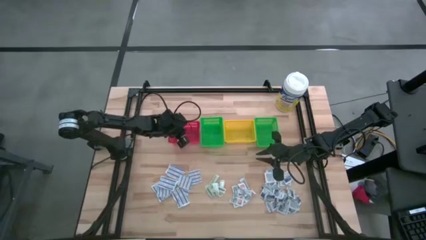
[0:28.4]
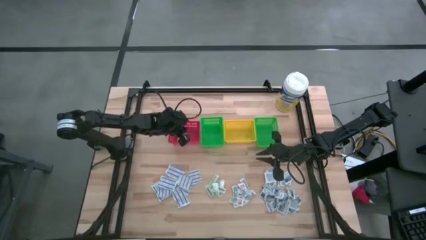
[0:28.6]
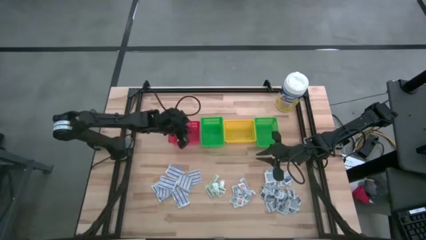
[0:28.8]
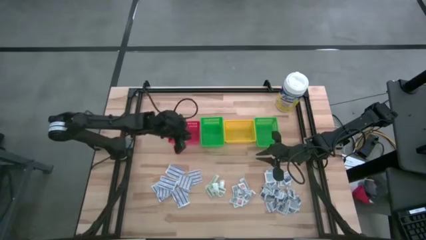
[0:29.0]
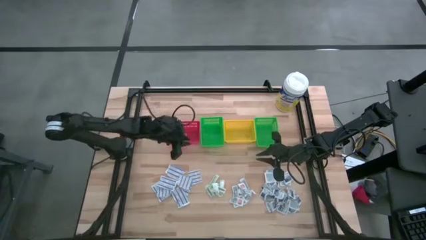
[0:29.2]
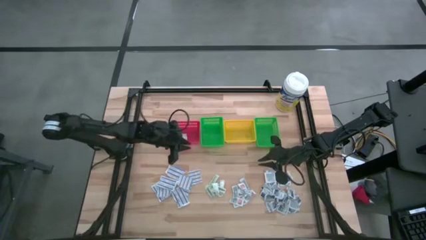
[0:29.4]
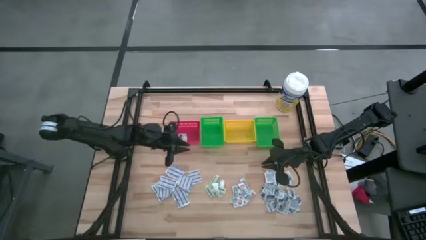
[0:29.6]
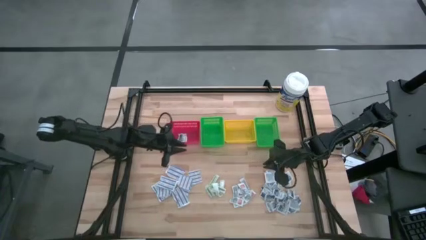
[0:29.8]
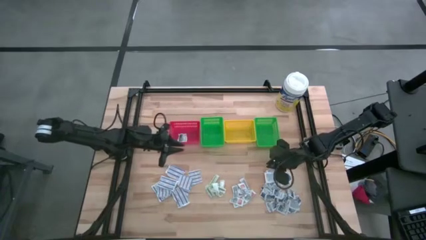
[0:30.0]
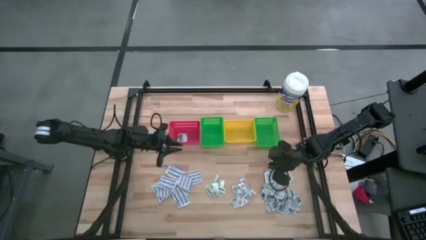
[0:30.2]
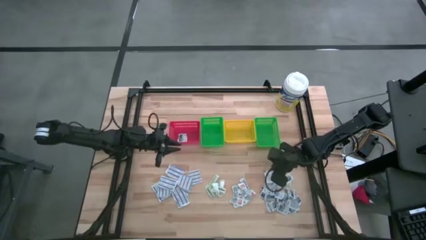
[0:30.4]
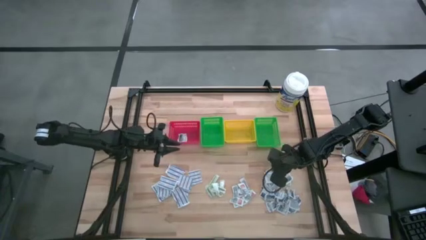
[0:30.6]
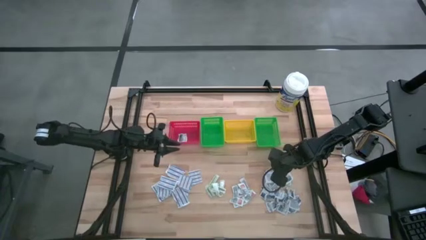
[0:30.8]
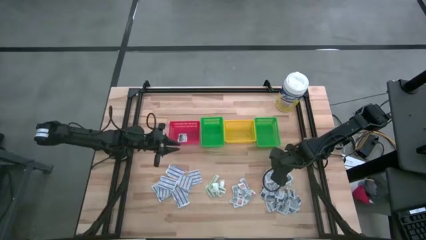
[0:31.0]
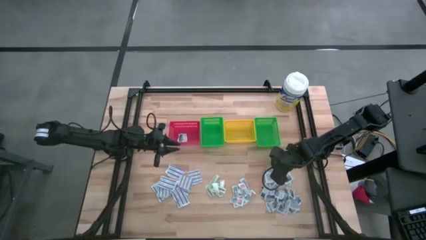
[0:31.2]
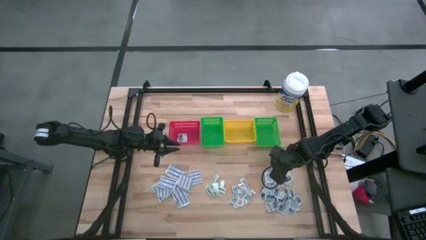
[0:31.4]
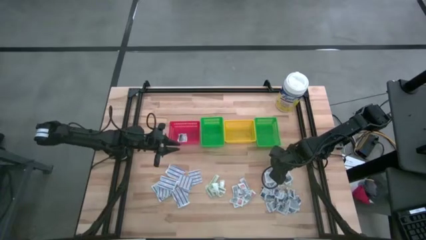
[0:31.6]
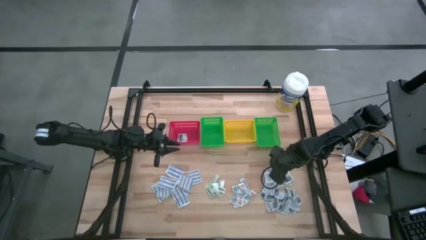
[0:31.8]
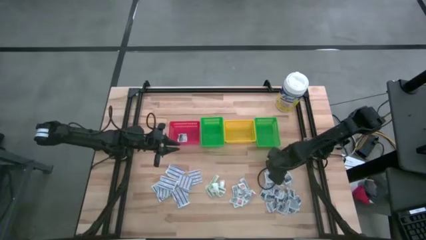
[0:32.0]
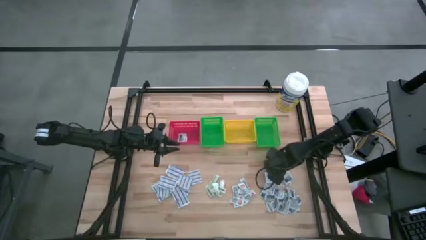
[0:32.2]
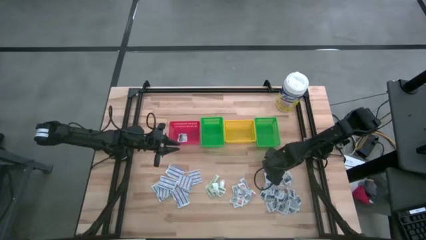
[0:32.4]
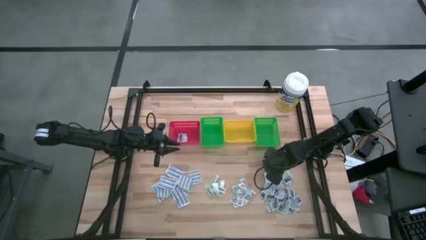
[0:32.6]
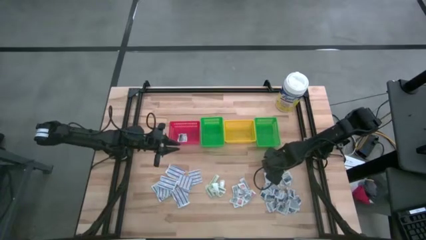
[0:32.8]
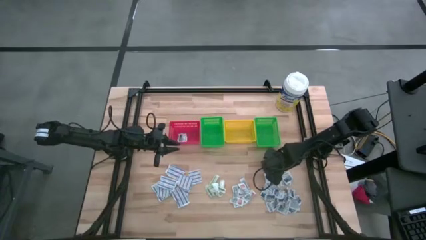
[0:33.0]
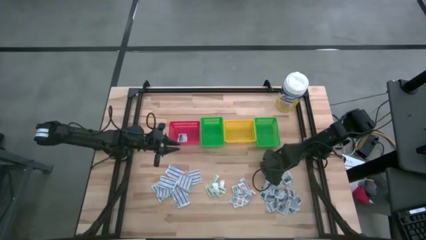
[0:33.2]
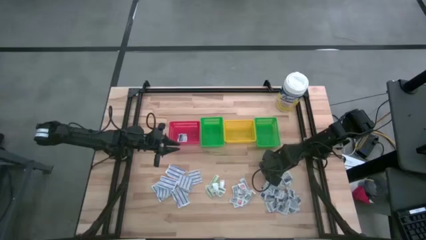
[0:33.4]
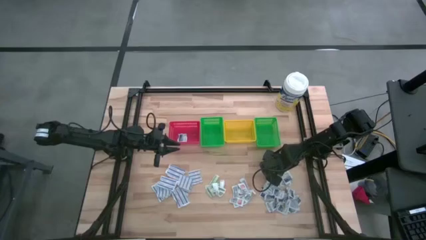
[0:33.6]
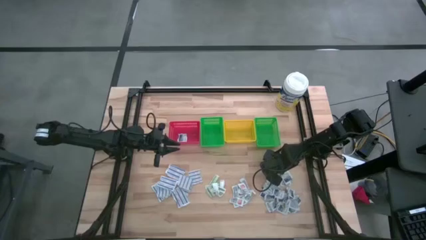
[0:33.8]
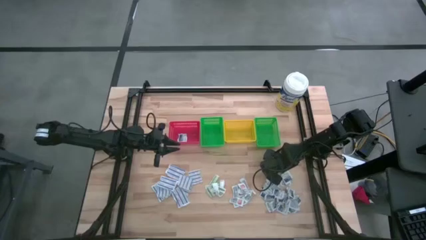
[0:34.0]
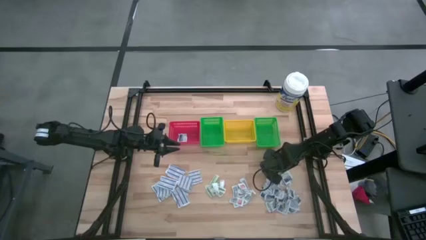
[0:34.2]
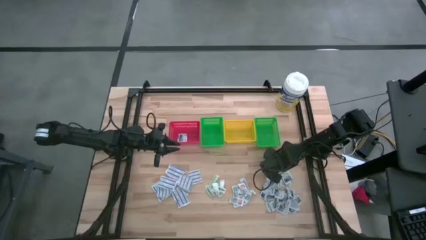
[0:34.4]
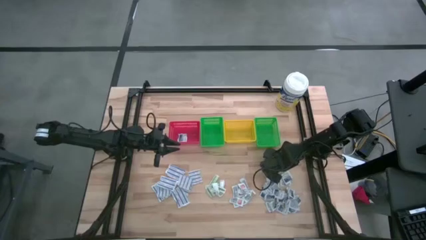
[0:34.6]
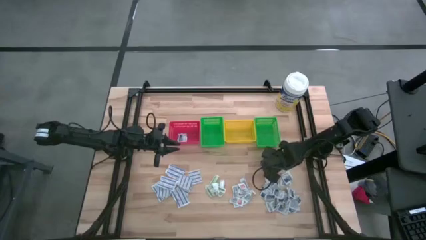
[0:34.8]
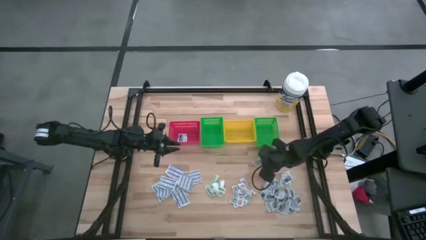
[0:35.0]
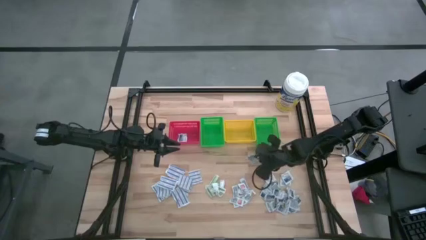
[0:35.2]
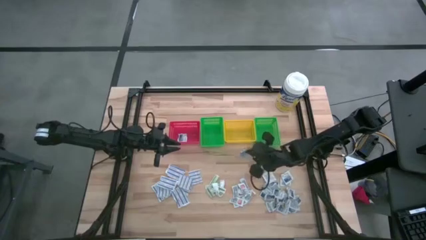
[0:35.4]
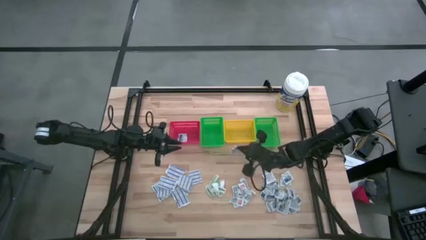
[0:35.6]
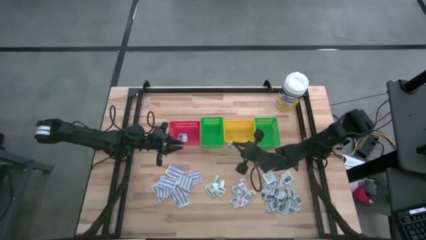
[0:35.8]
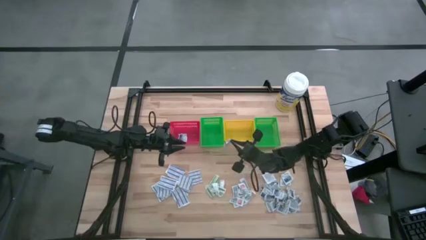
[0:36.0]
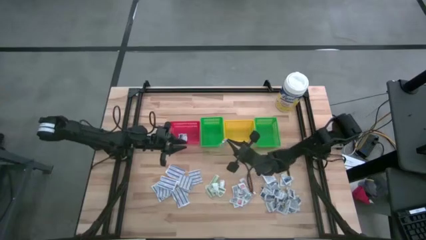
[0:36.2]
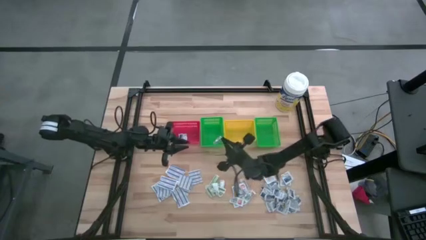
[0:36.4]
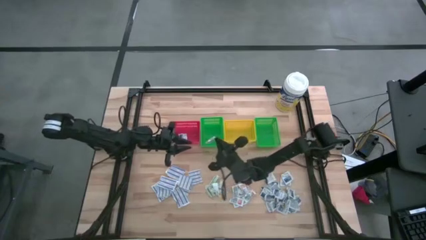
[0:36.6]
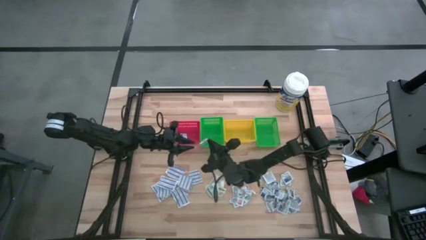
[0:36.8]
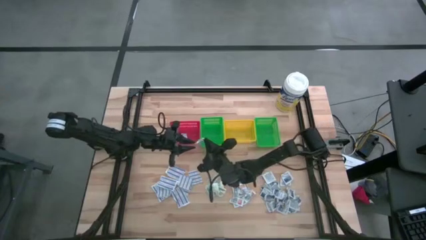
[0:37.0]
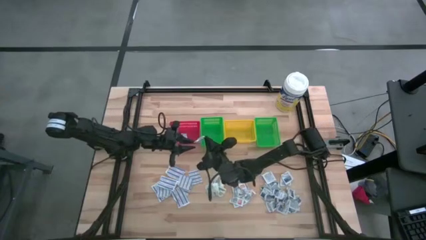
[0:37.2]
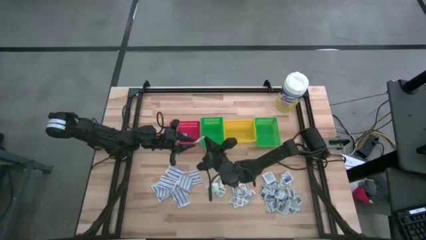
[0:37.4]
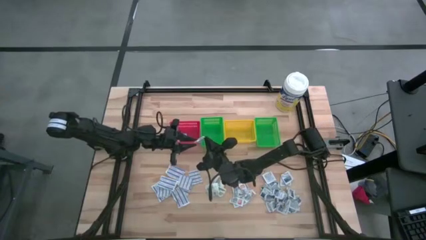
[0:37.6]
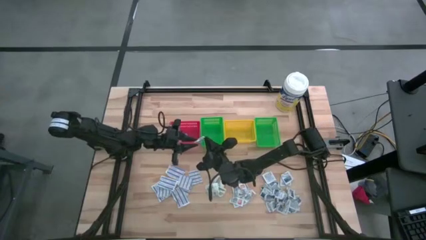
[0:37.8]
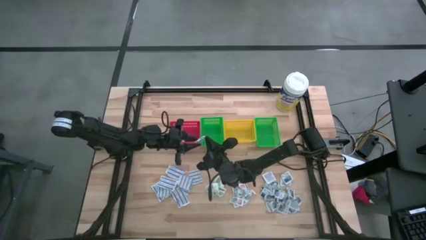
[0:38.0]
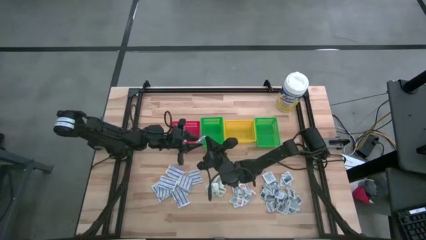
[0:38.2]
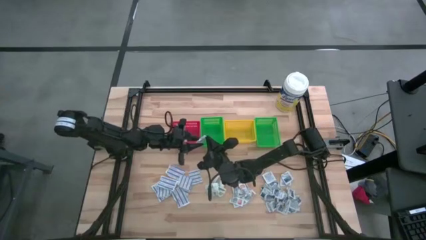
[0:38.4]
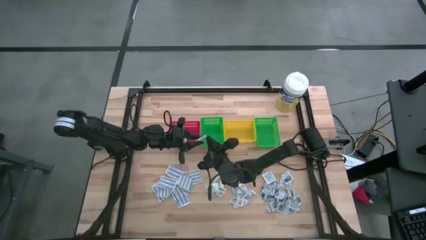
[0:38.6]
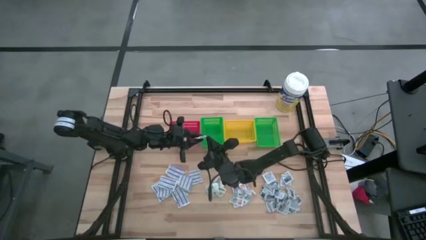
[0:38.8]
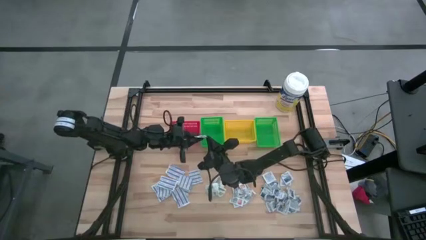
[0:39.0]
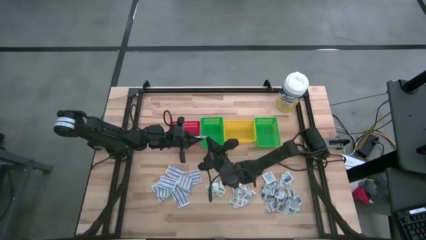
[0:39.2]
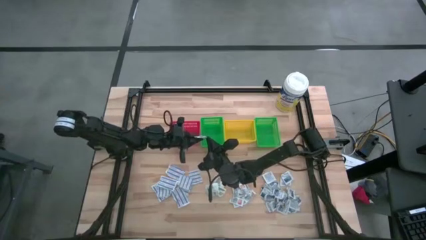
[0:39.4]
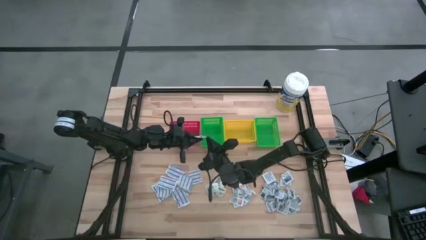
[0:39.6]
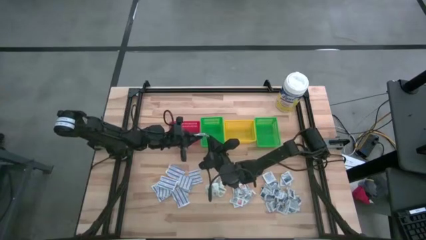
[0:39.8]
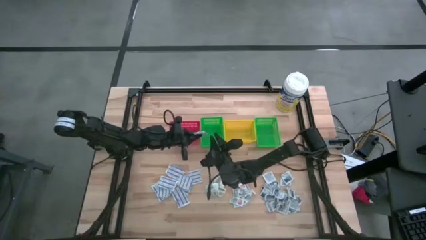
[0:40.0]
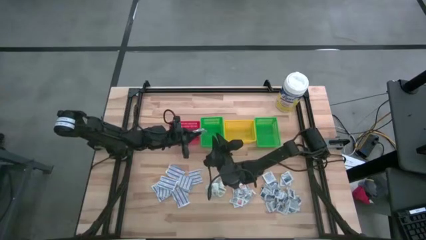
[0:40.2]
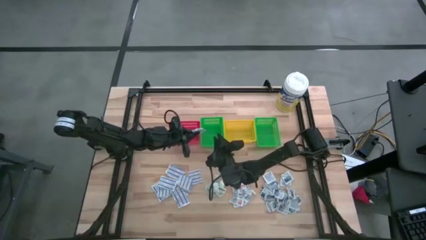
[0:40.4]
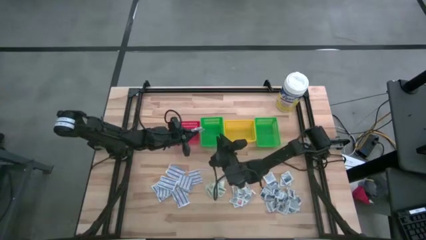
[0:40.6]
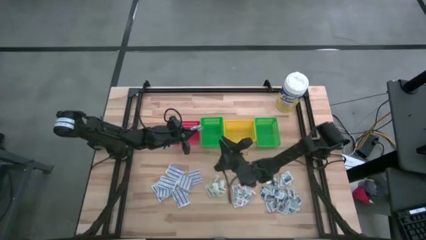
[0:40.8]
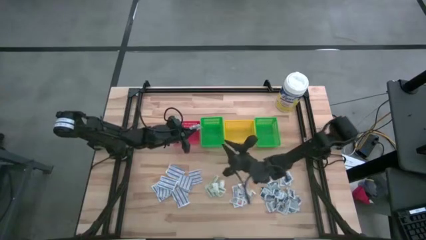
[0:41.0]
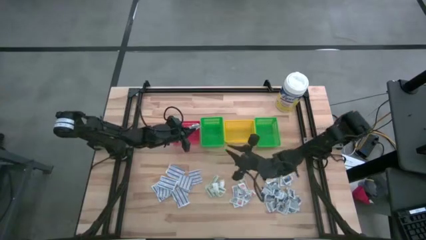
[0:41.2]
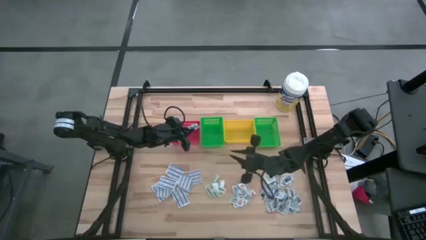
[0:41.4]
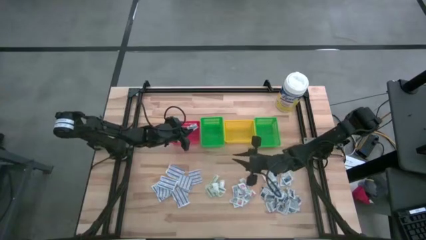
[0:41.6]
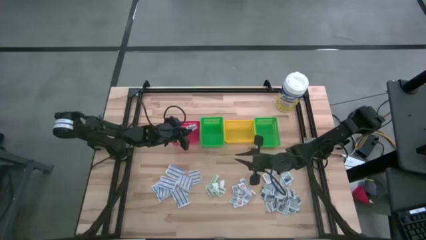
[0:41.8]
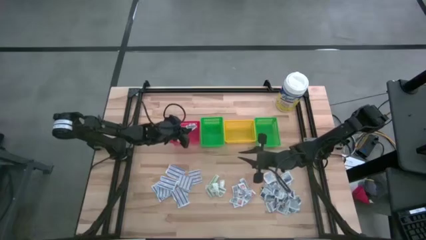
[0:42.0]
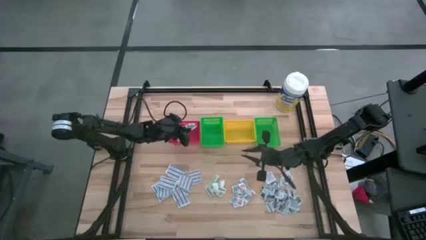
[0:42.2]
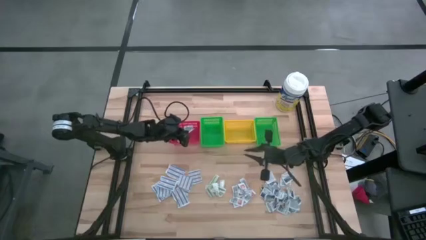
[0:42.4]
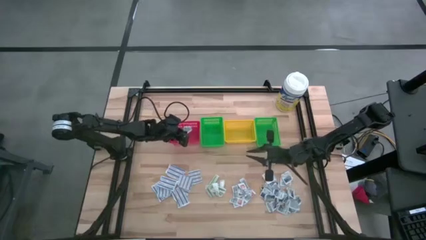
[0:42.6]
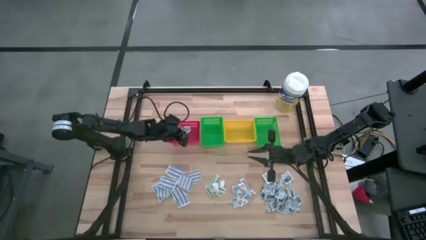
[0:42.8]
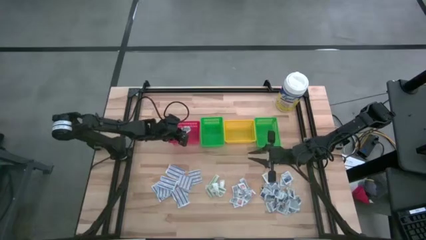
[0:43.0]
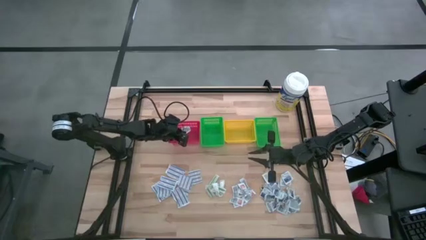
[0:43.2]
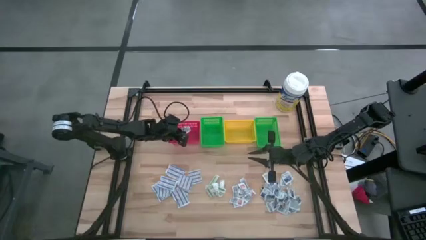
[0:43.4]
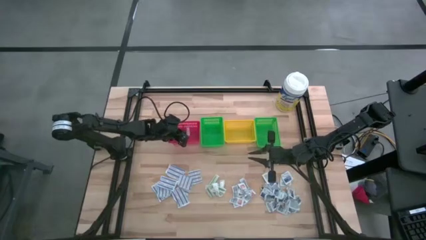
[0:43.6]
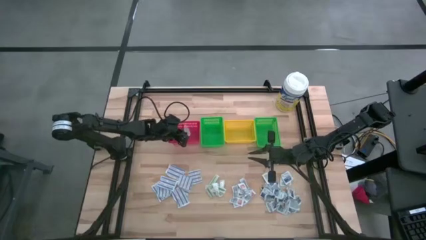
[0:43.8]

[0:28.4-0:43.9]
Task: Pick & Place First Aid Supplies
Put the alcohol pad into the red basket
